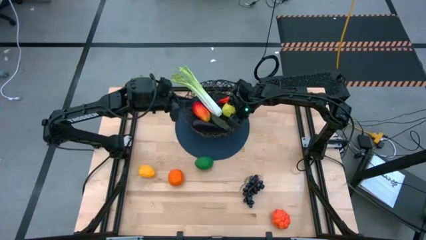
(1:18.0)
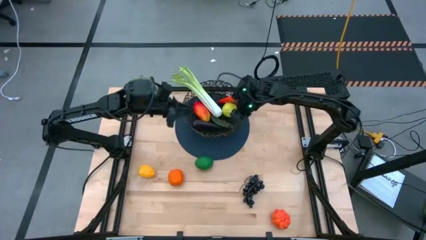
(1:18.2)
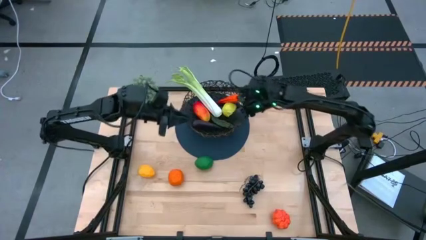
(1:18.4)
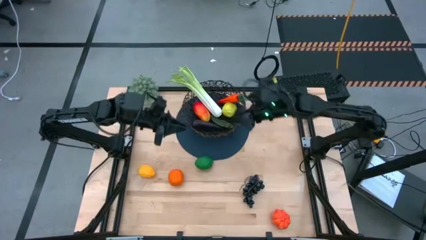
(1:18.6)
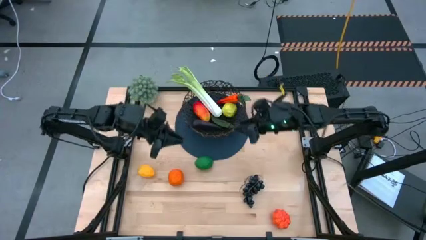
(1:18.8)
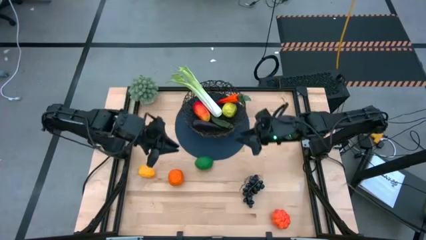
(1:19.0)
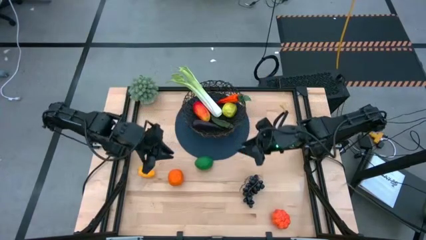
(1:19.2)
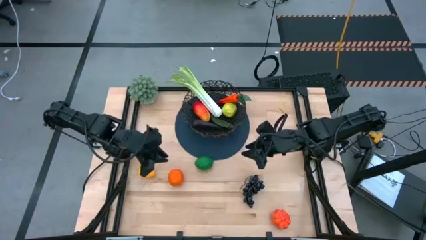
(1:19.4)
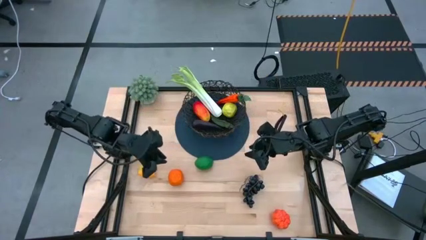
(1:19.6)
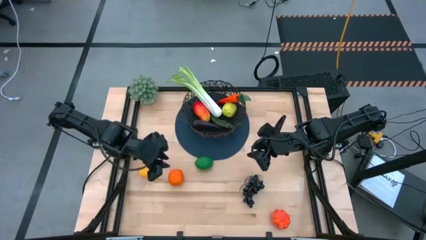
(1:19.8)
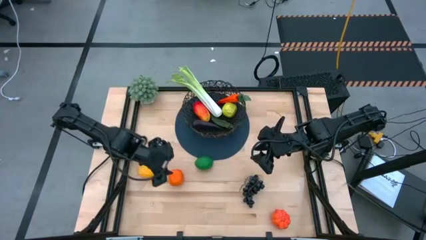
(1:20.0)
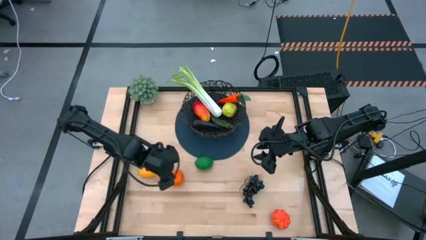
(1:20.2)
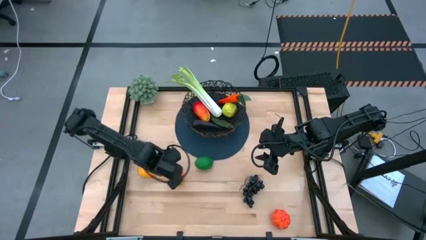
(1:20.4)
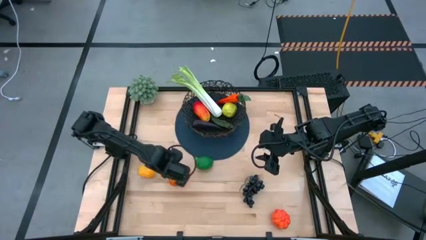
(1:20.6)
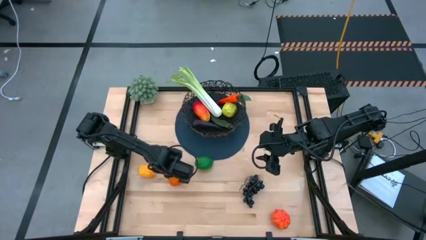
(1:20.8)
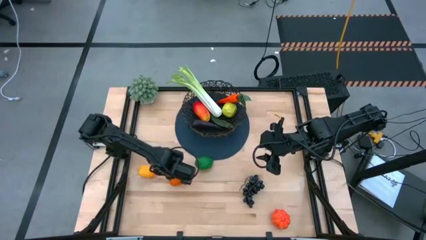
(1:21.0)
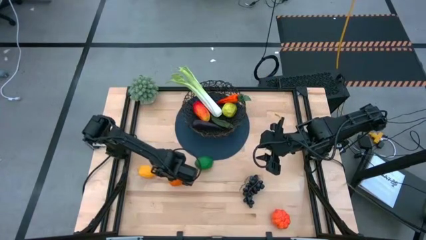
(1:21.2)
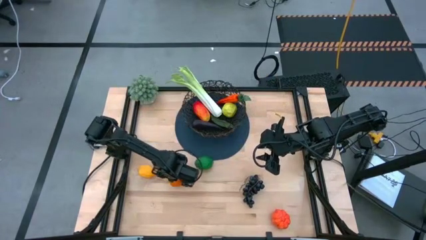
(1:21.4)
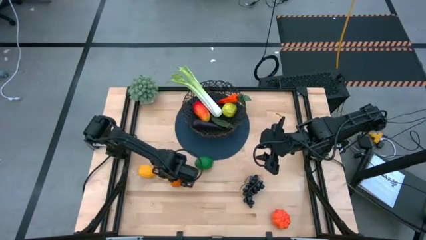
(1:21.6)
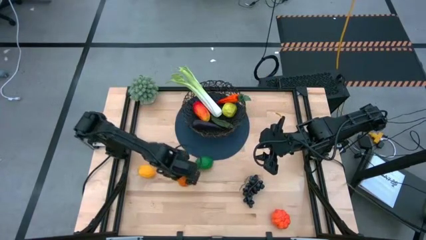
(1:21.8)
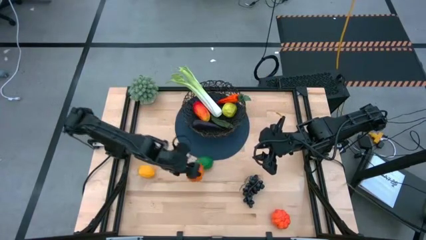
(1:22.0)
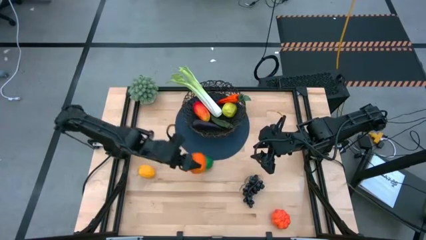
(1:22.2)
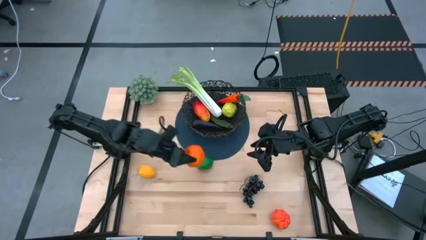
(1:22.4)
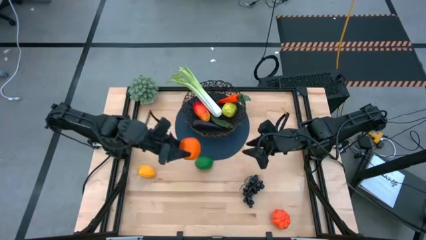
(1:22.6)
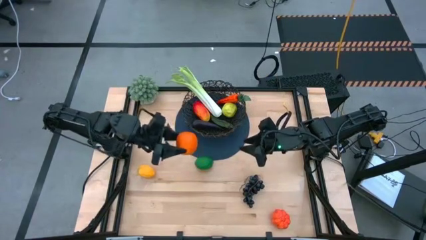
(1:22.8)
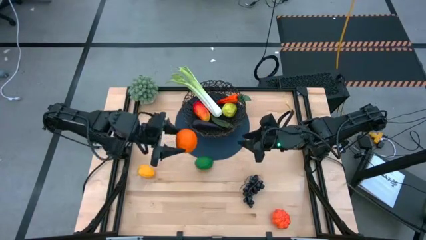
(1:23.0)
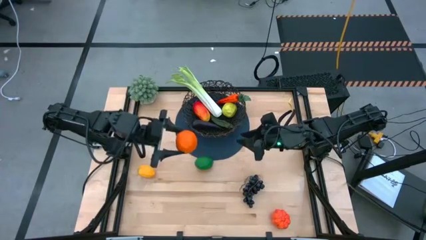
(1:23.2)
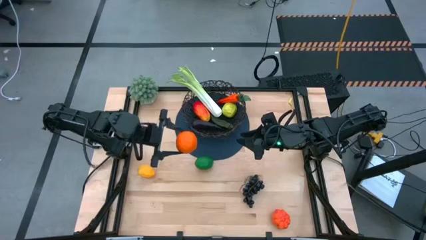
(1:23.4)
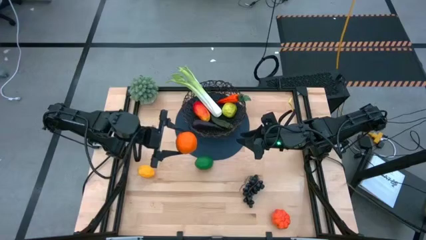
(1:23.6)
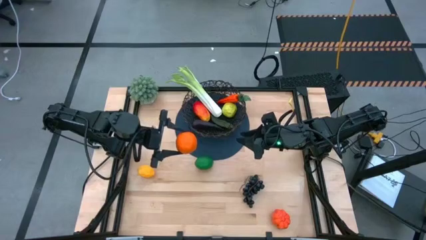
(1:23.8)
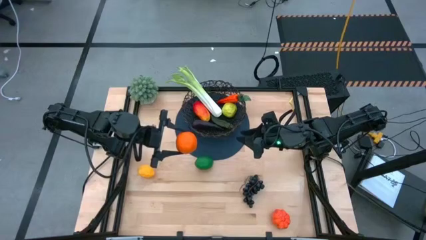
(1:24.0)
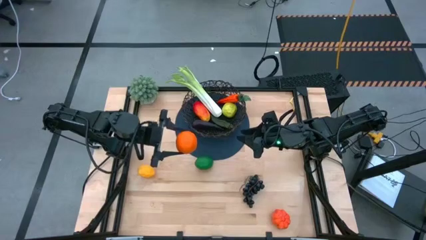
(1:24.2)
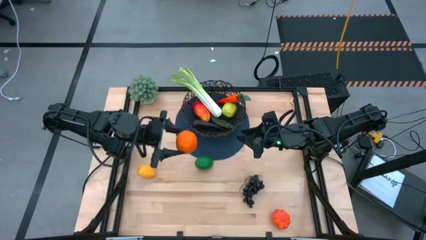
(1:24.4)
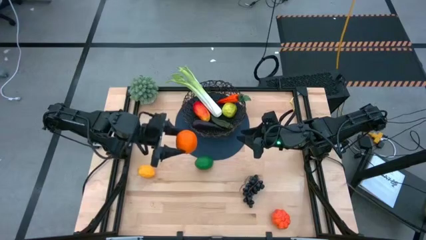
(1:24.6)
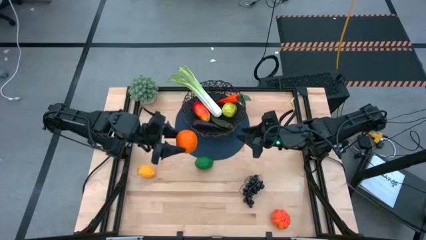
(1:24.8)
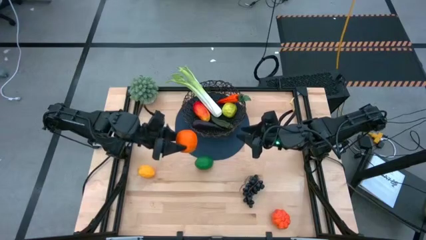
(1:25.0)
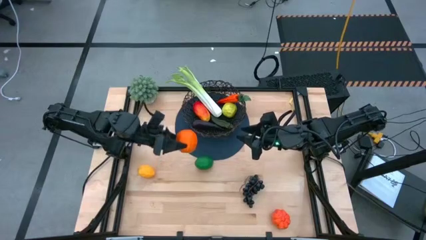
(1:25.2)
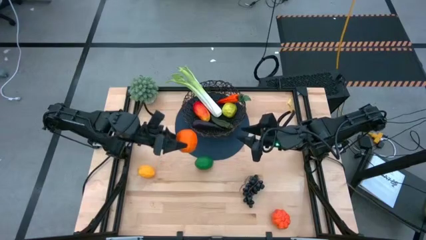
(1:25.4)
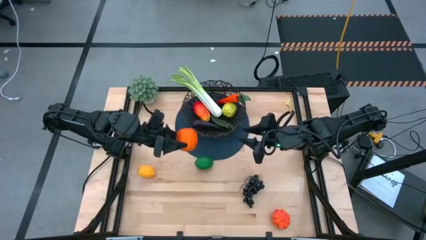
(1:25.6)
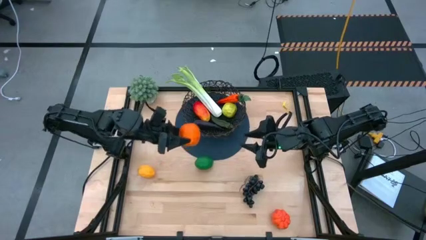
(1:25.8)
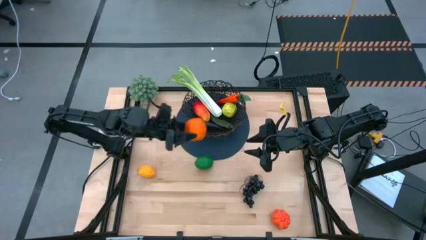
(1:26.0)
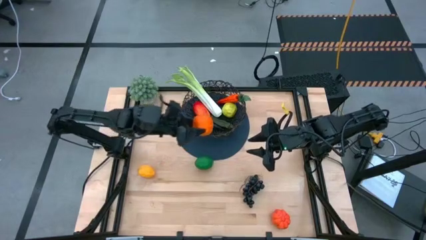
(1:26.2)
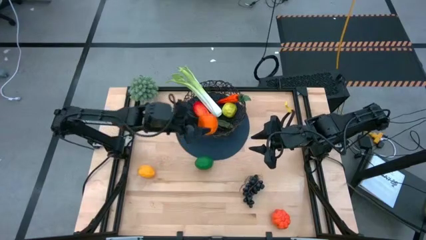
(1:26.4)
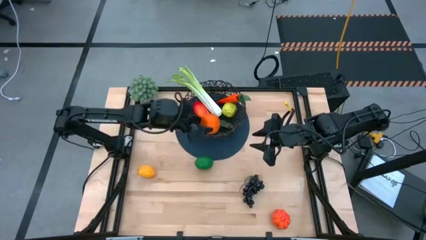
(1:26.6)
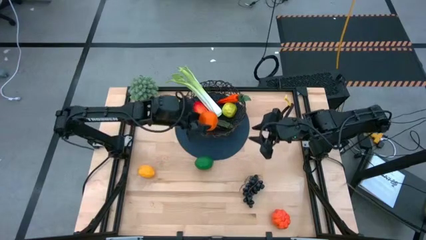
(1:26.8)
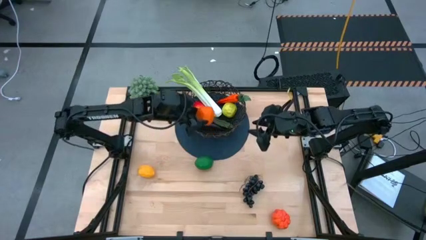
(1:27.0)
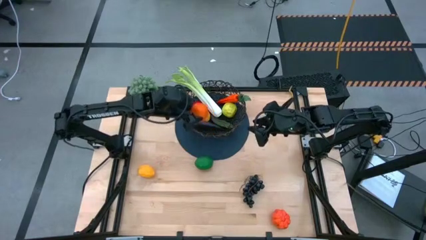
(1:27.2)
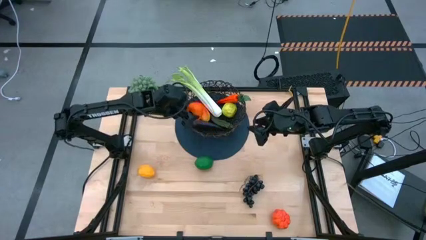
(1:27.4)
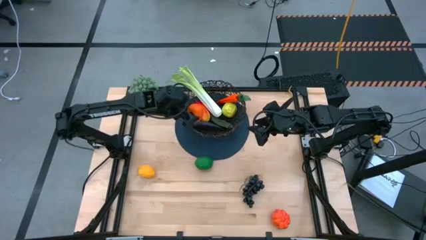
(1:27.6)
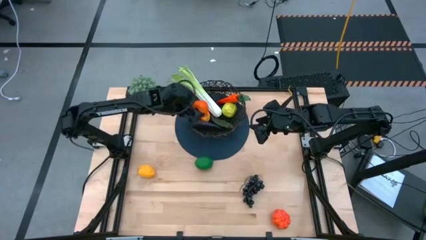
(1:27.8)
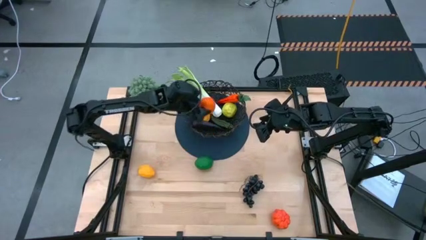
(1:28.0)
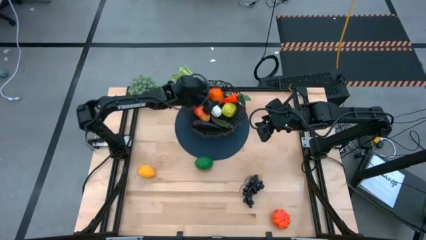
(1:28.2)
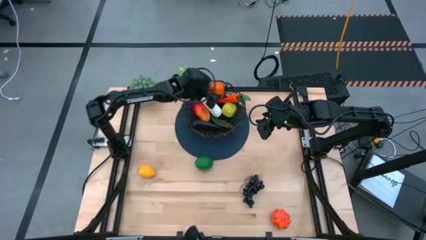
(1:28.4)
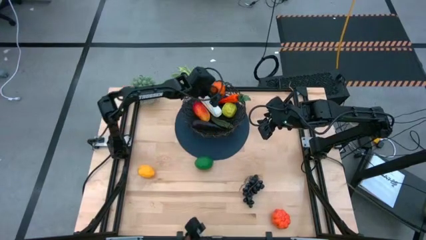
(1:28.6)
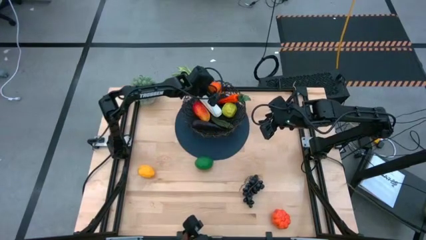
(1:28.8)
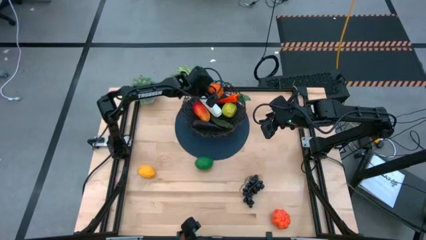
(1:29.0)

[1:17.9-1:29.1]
Task: Build produce basket
Put the orange into the wire basket

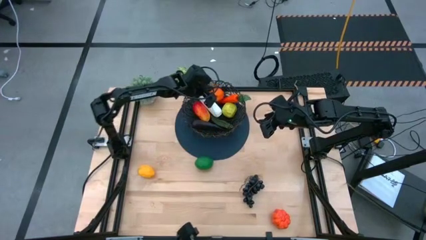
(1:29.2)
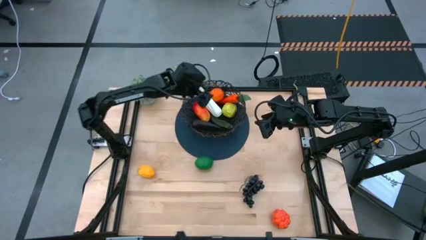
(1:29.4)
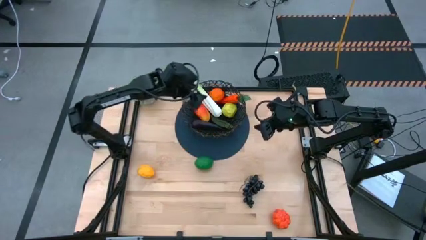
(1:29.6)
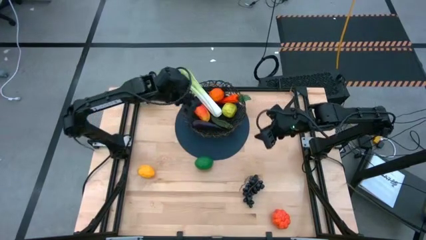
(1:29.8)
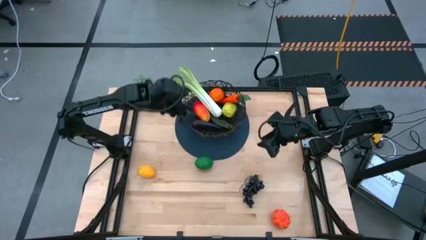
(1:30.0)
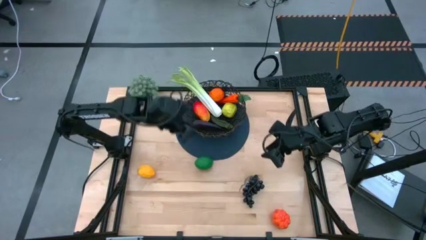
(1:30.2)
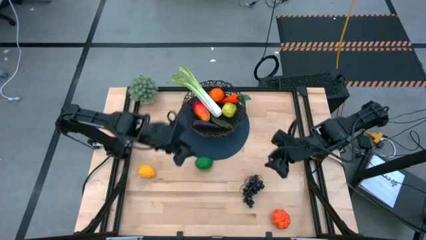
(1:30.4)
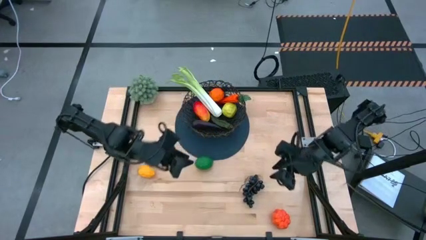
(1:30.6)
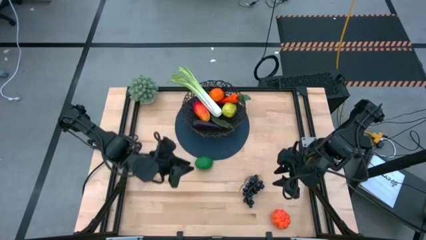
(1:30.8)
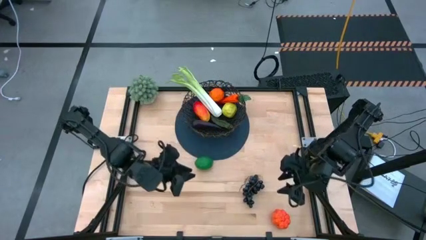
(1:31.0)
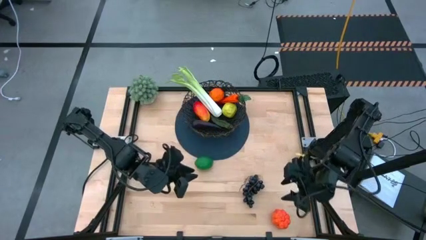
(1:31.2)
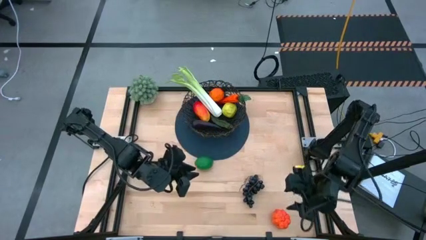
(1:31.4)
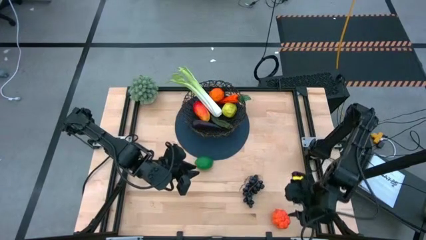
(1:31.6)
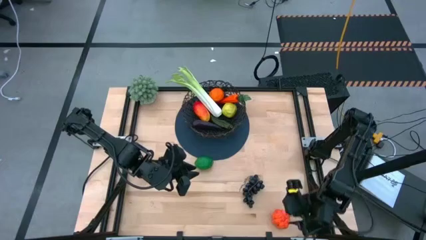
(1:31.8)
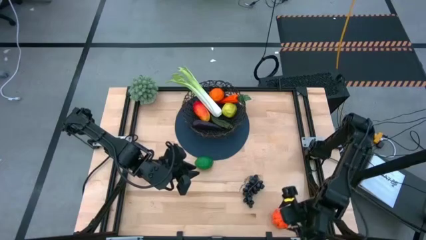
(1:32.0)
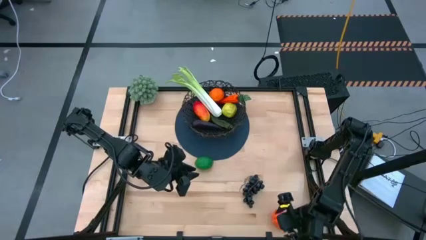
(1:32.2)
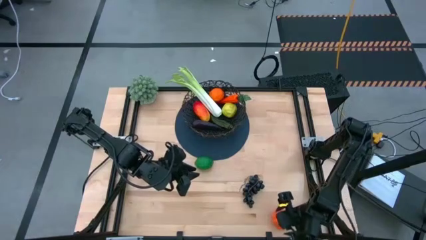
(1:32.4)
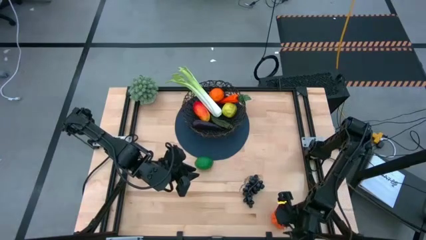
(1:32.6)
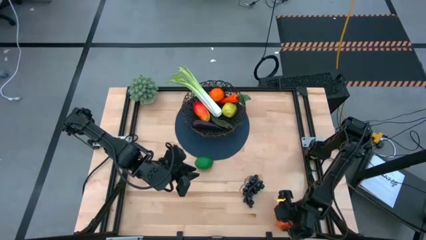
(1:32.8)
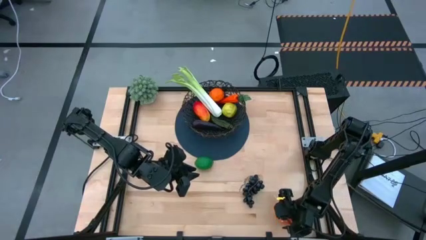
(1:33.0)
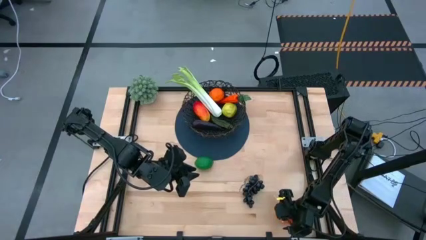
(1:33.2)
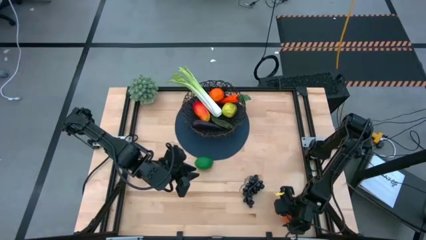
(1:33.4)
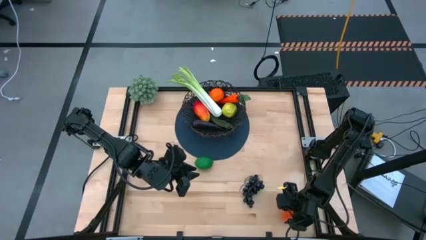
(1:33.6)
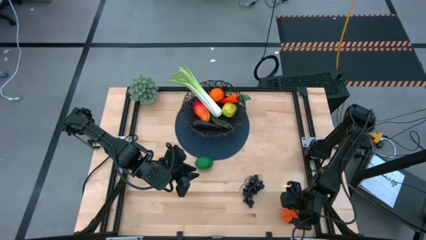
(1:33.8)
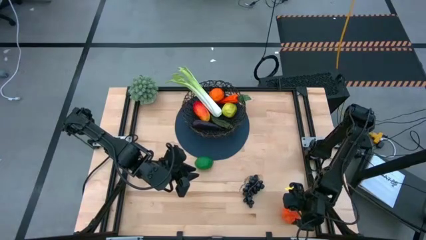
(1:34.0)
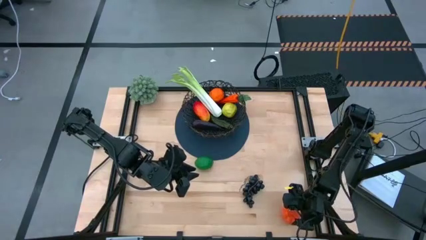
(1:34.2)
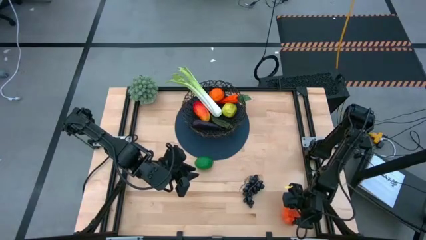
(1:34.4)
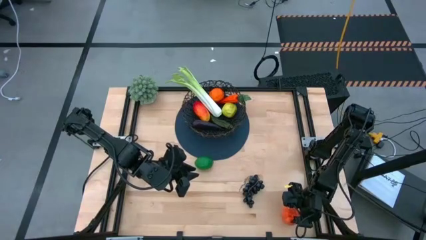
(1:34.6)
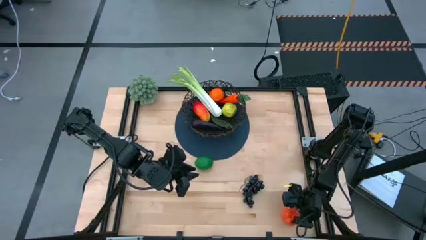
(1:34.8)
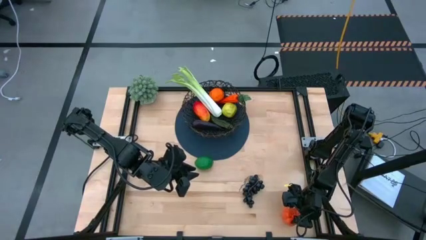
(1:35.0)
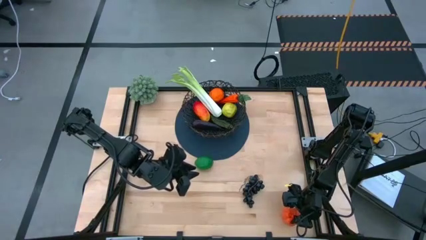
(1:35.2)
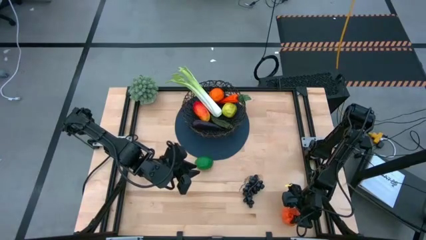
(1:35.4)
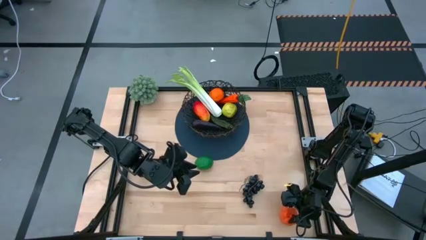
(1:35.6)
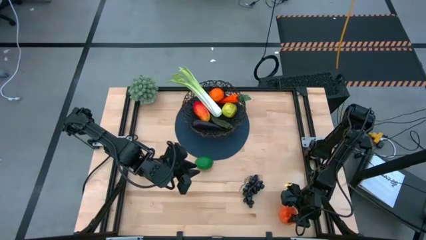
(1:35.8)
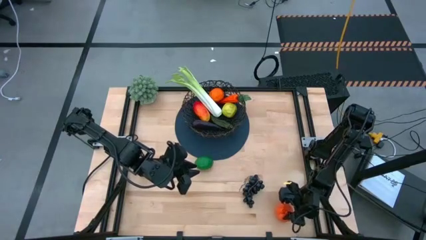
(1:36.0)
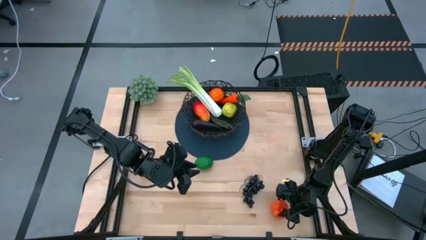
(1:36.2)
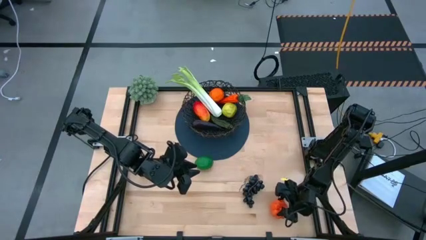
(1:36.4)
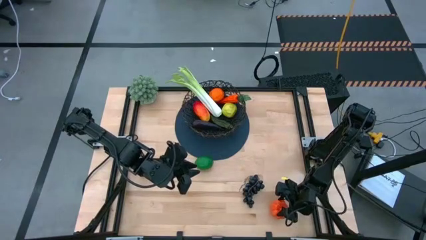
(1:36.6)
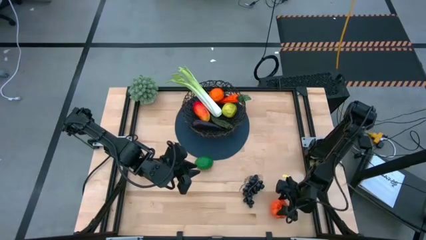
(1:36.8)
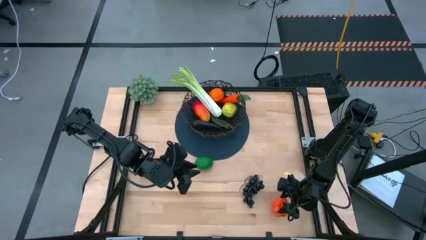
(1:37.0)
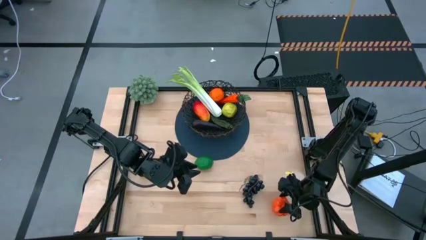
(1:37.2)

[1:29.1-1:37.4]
Put the orange pumpkin into the wire basket
